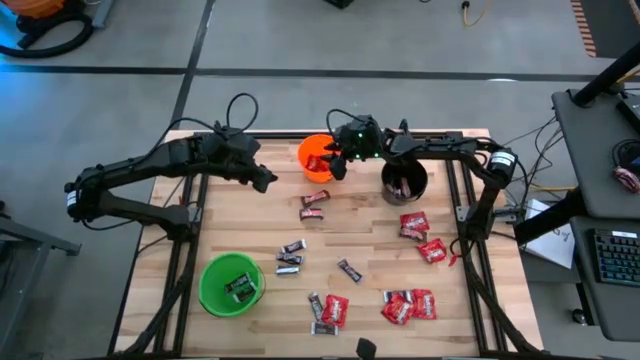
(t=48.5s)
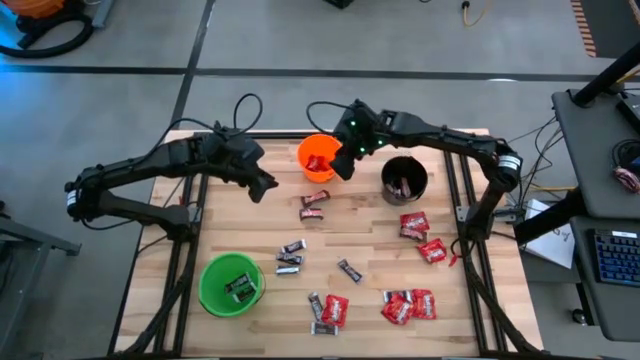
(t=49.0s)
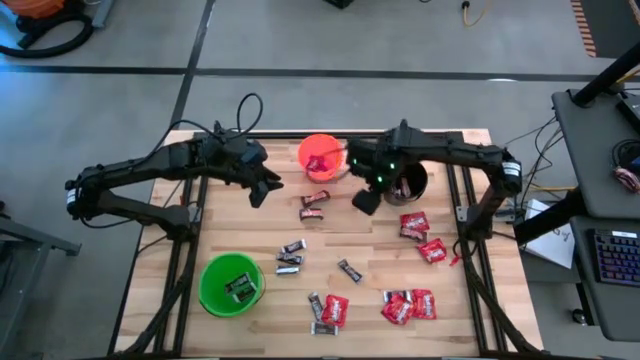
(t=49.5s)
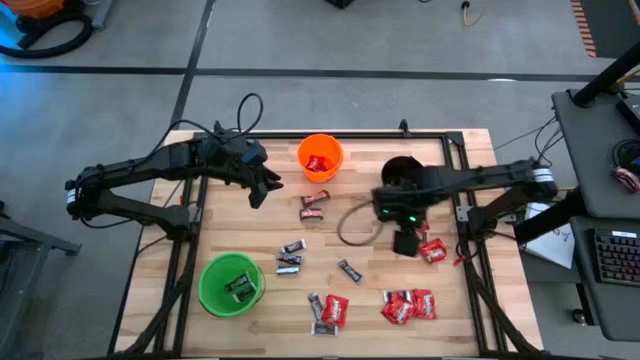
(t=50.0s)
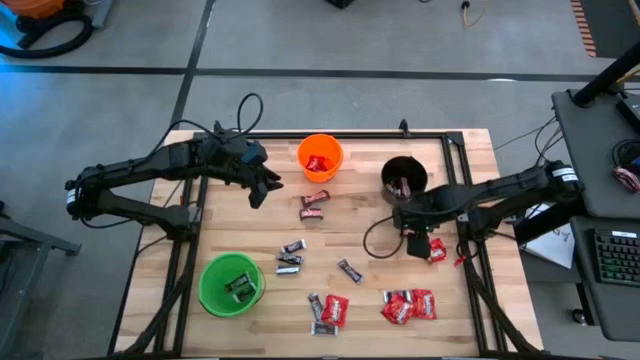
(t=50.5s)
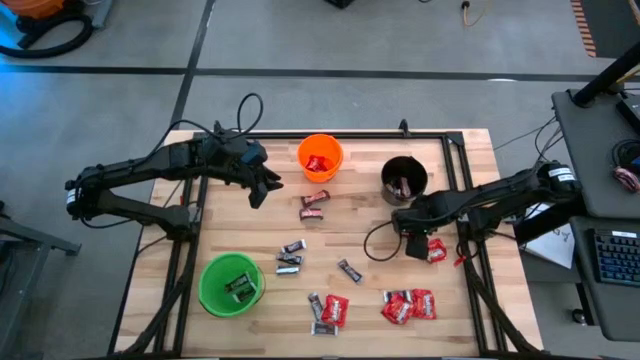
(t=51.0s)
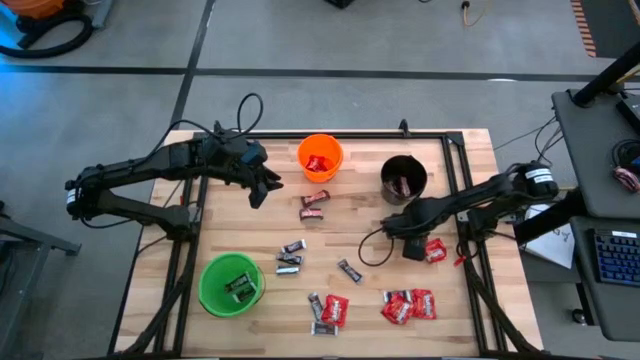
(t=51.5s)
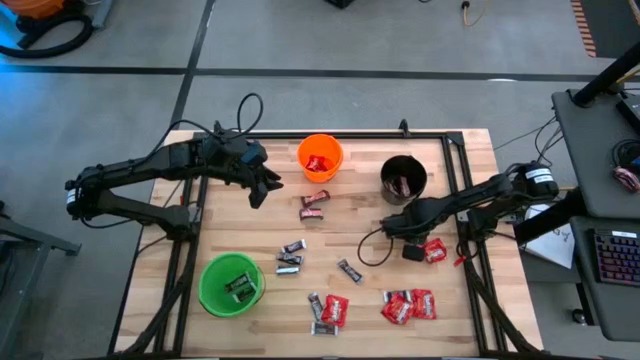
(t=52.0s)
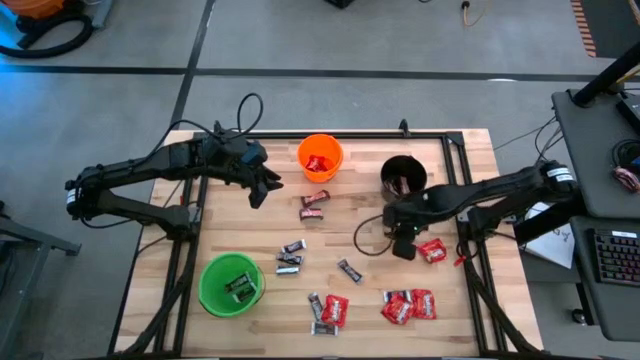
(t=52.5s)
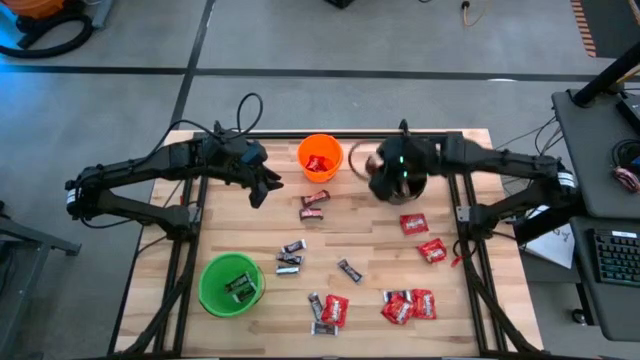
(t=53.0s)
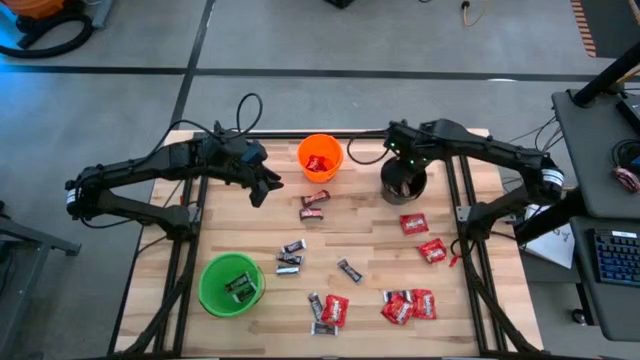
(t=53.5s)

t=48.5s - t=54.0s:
Task: Sort candy
Put the brown chocolate into the black bucket

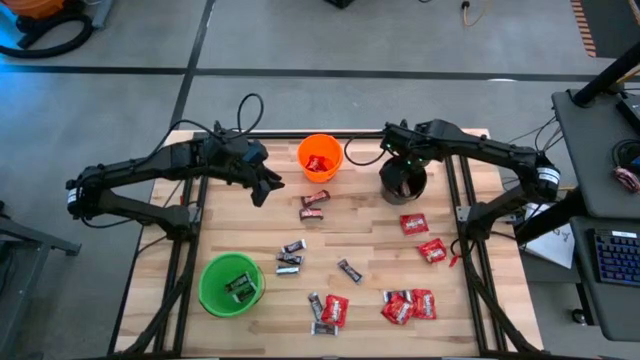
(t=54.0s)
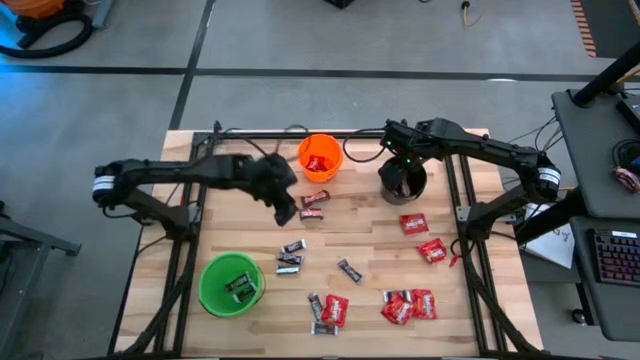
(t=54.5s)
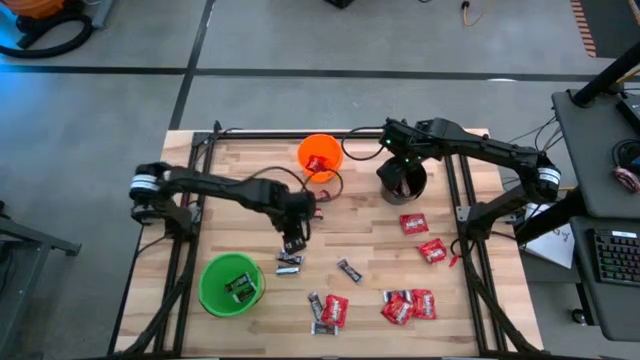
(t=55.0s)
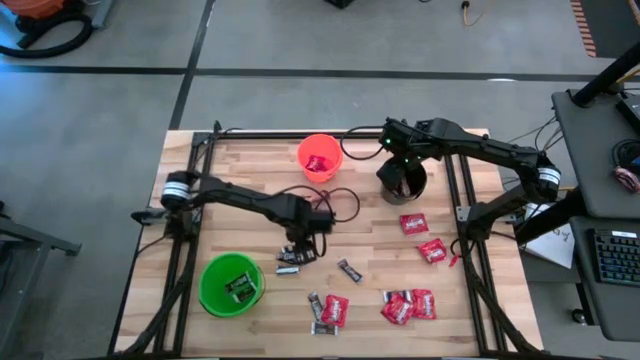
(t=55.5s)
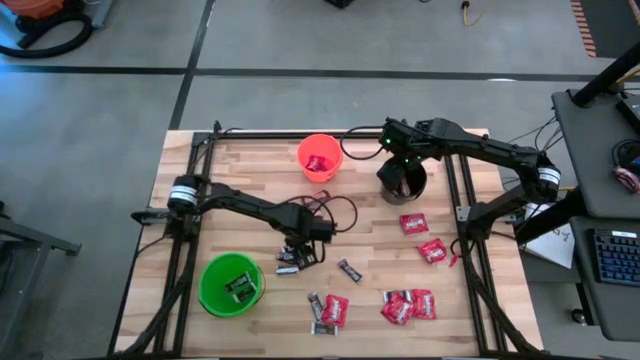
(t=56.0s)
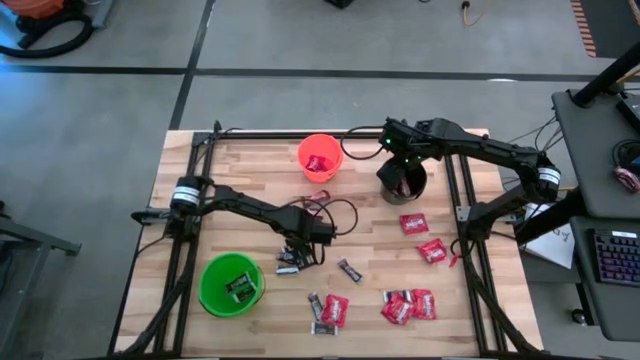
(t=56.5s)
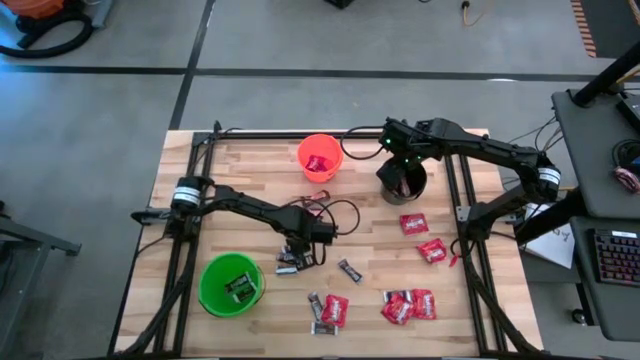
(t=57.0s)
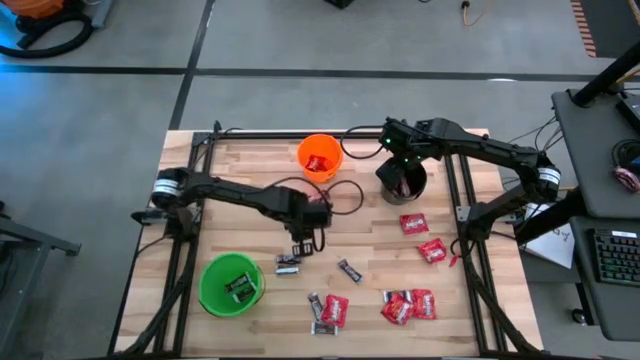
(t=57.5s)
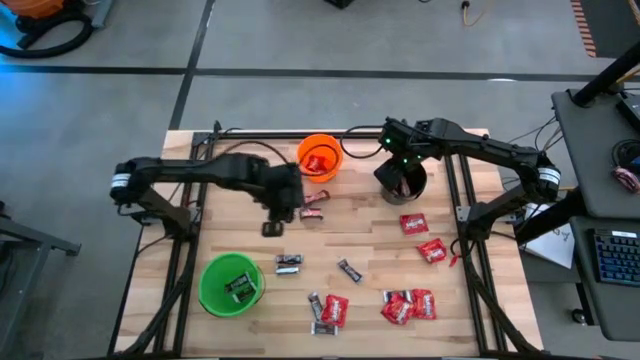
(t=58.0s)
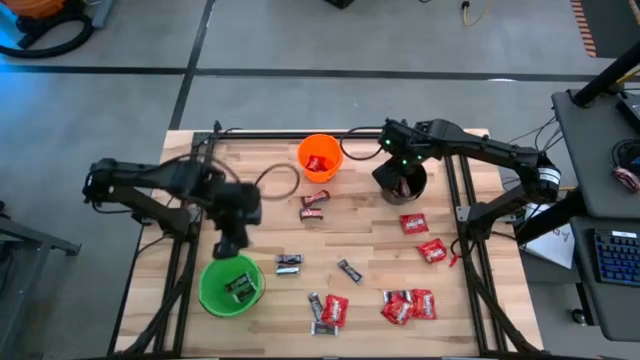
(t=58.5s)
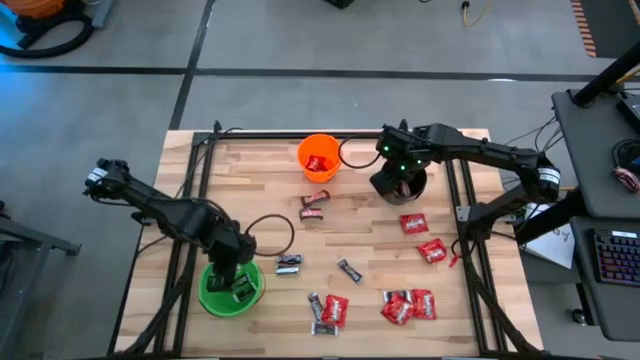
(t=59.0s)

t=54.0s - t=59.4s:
Put the black chocolate into the green bucket

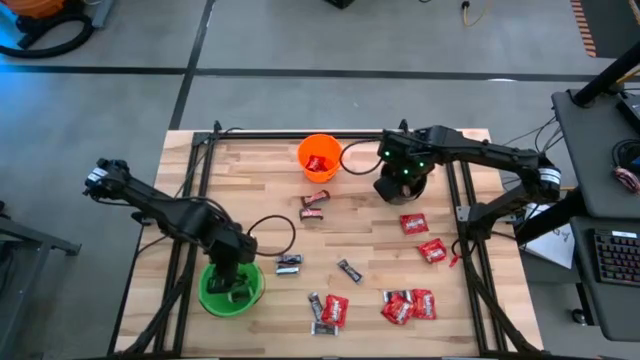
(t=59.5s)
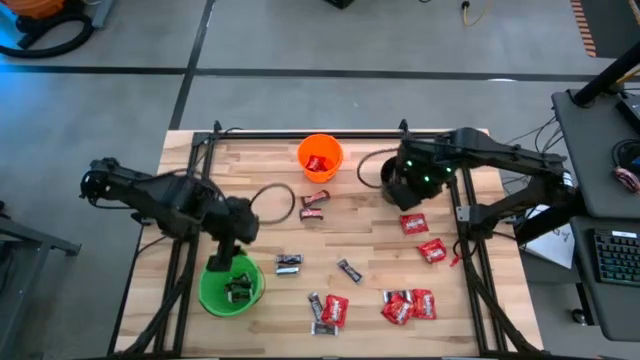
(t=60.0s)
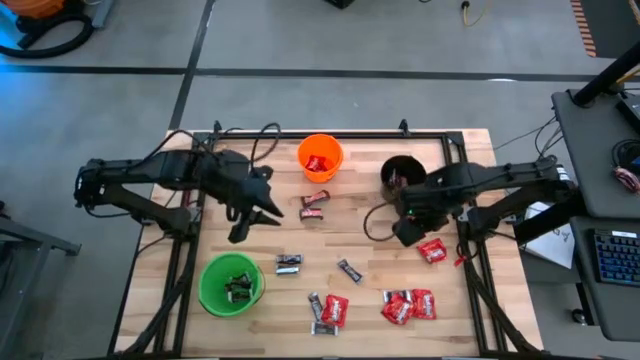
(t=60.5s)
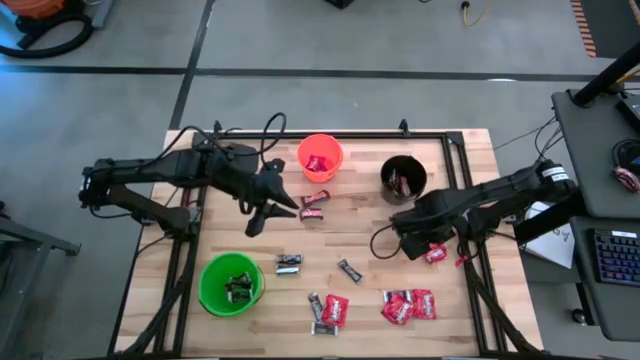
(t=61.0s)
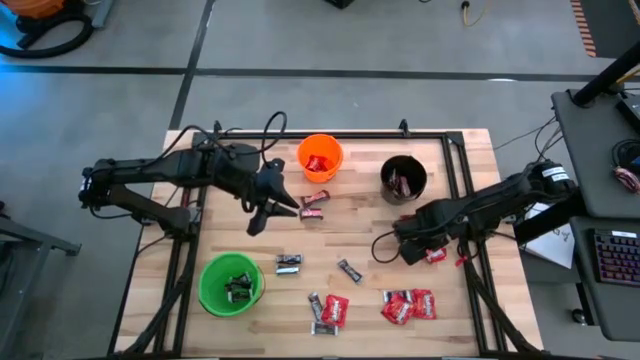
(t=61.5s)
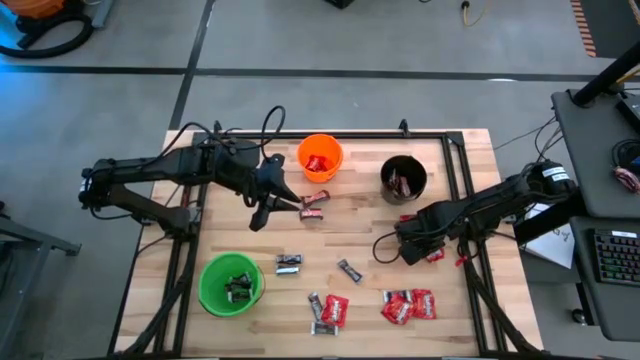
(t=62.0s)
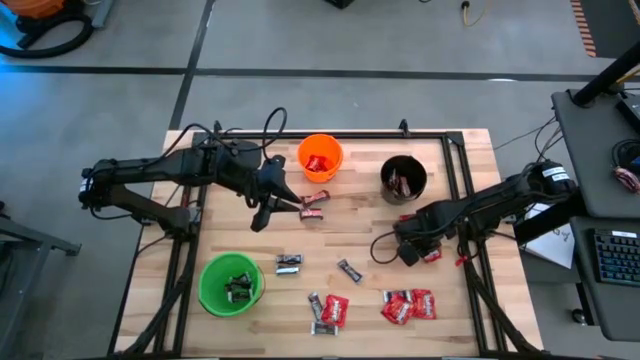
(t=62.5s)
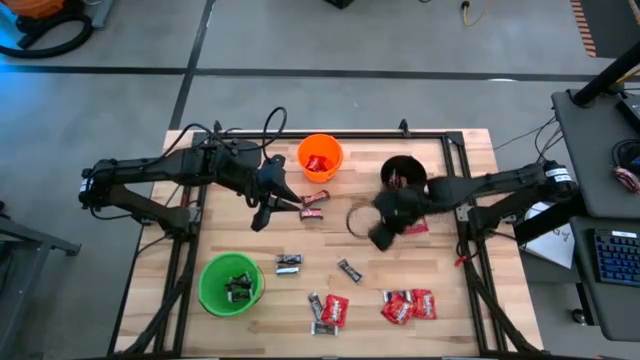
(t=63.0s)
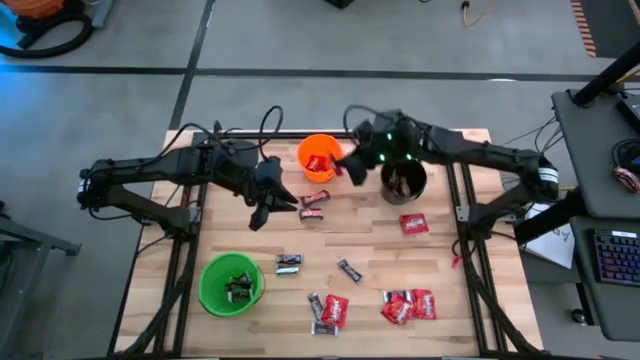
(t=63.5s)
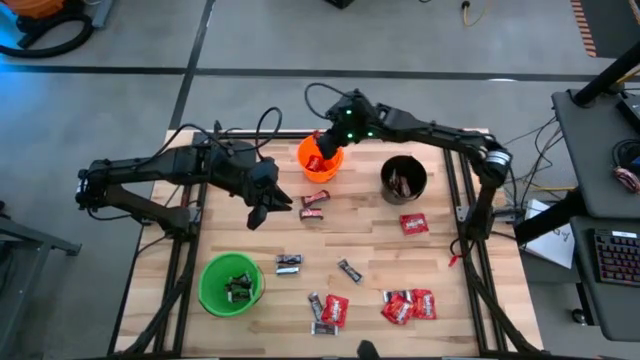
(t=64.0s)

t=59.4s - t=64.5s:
Put the red candy into the orange bucket

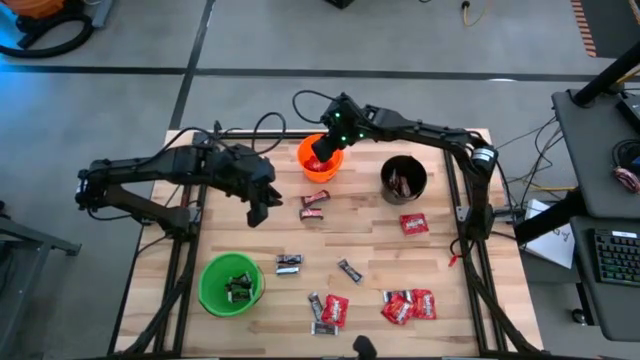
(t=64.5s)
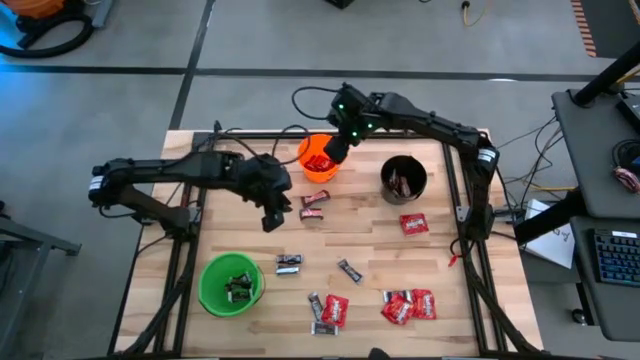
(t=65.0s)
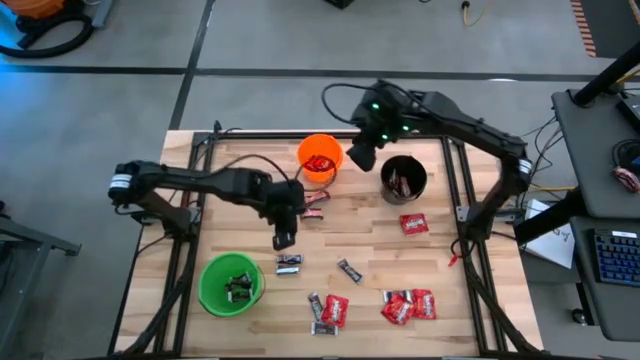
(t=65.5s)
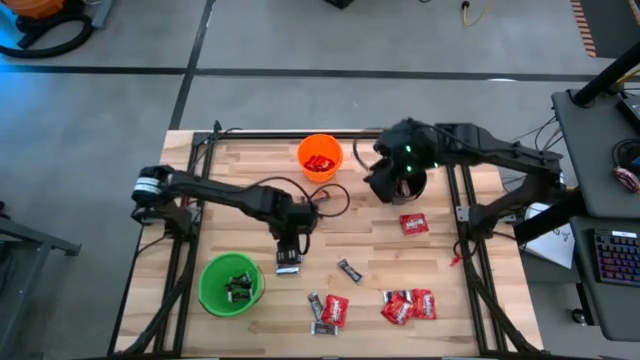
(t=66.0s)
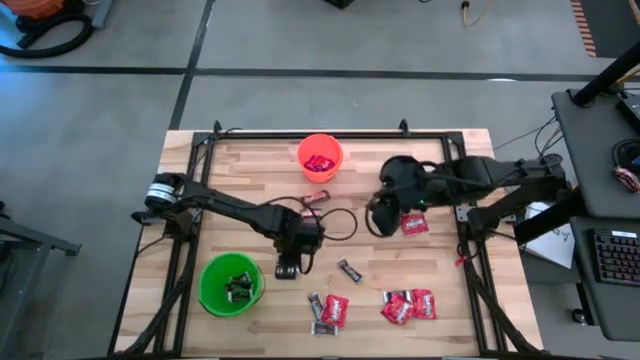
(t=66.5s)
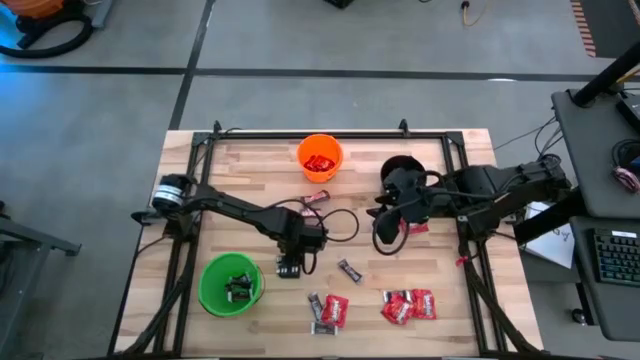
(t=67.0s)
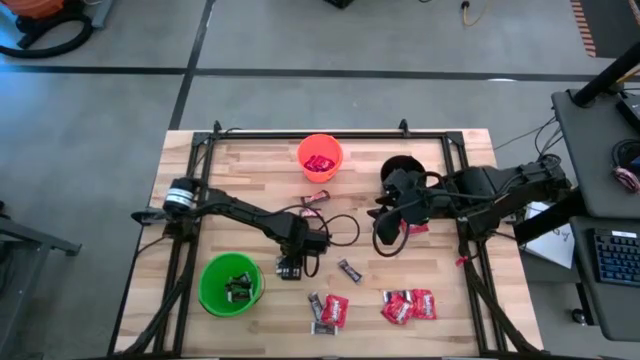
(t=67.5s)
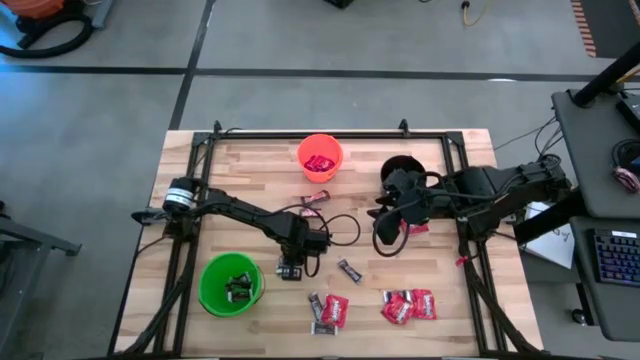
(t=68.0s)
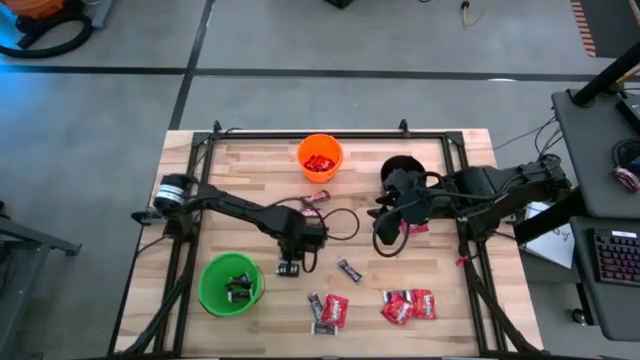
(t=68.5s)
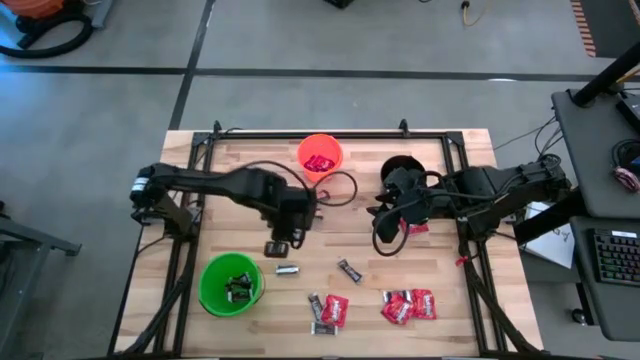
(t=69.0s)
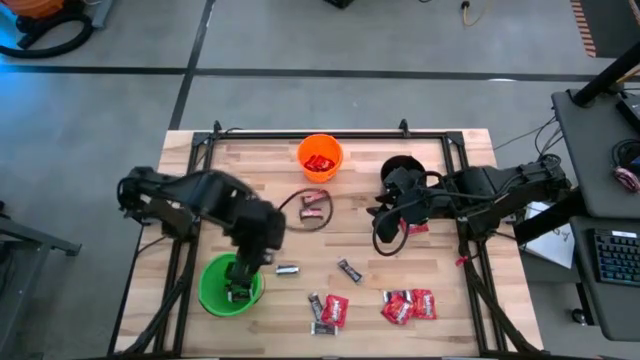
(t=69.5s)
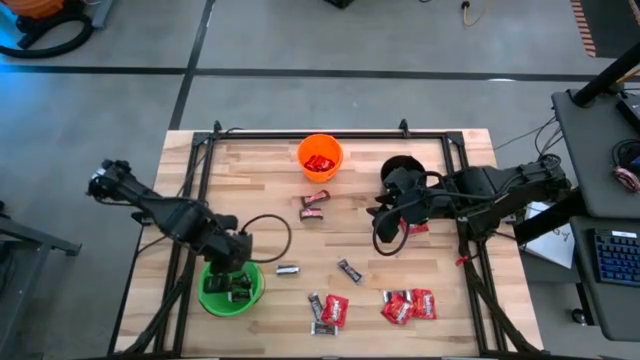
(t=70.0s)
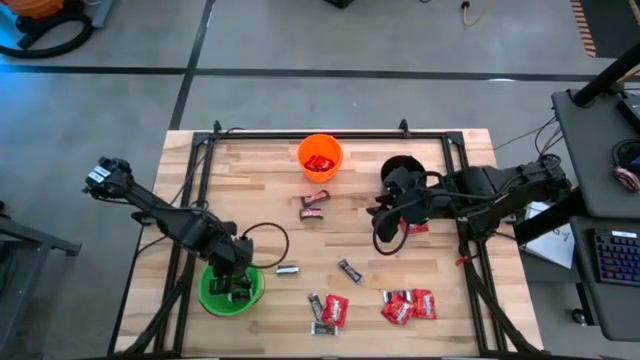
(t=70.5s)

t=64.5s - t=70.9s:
Put the black chocolate into the green bucket
